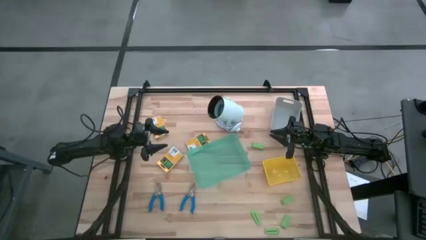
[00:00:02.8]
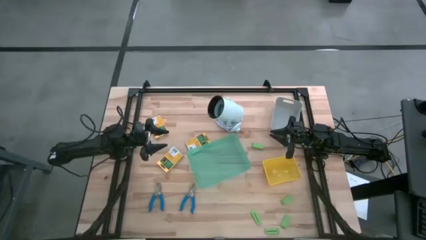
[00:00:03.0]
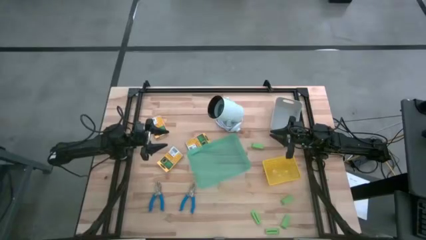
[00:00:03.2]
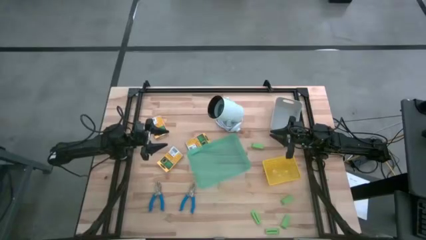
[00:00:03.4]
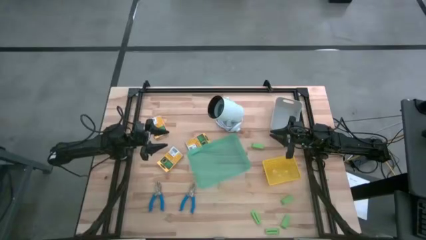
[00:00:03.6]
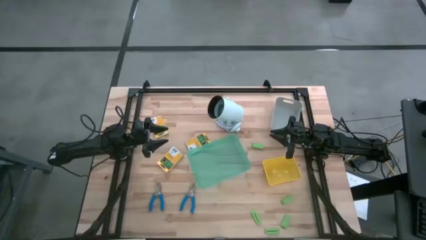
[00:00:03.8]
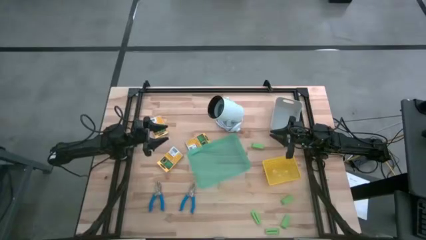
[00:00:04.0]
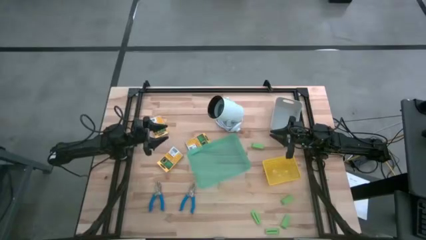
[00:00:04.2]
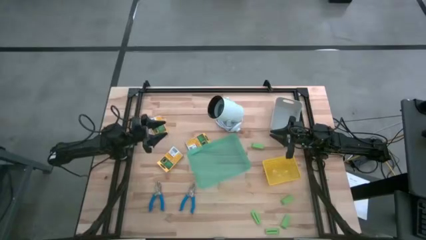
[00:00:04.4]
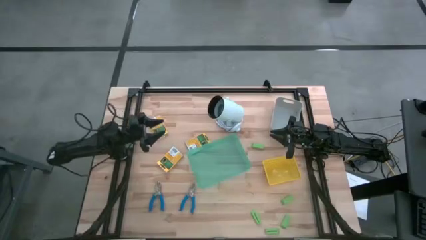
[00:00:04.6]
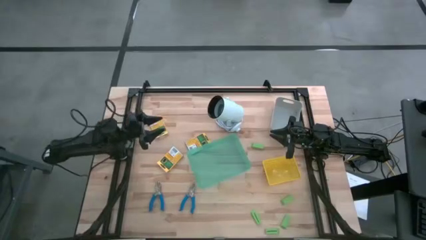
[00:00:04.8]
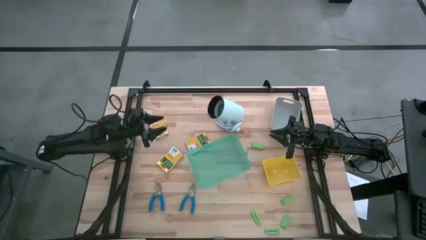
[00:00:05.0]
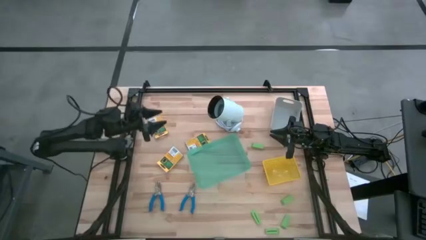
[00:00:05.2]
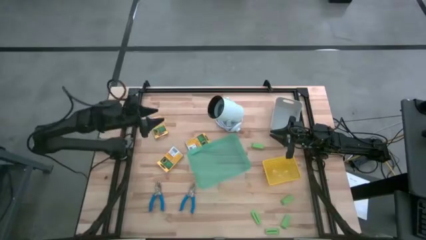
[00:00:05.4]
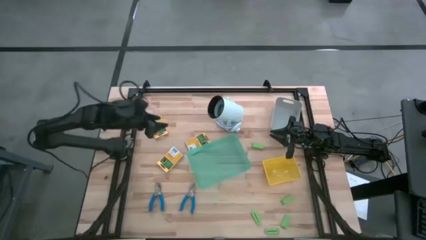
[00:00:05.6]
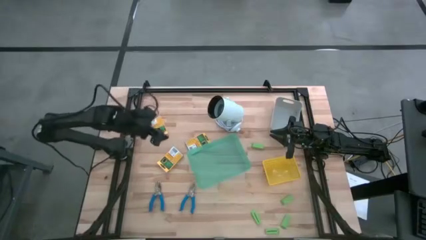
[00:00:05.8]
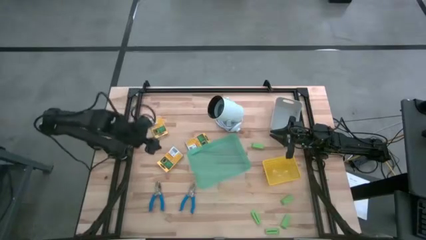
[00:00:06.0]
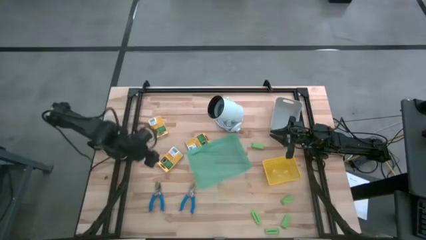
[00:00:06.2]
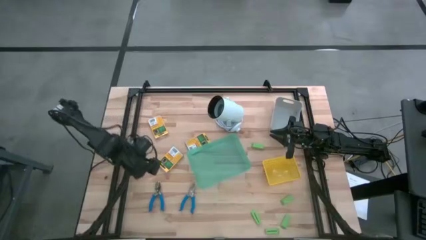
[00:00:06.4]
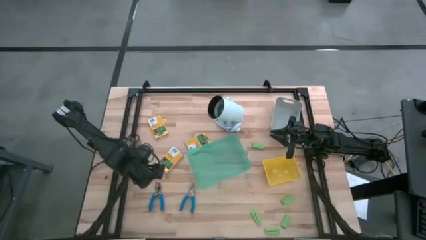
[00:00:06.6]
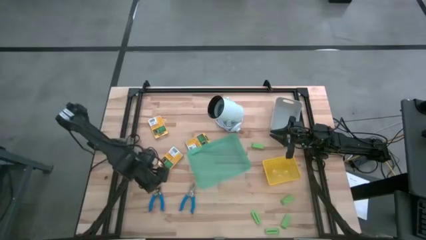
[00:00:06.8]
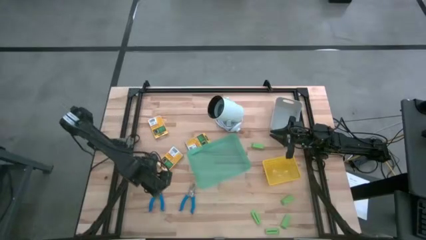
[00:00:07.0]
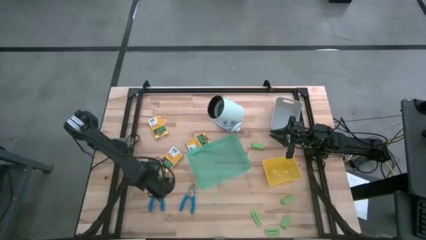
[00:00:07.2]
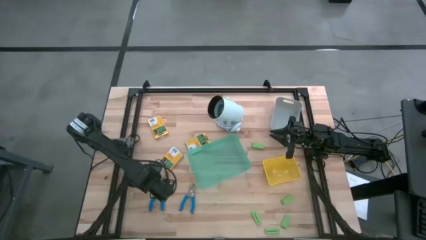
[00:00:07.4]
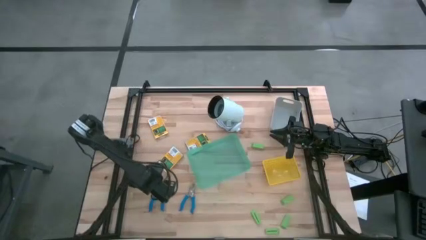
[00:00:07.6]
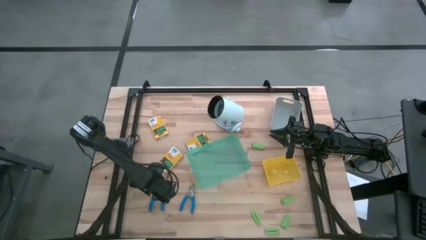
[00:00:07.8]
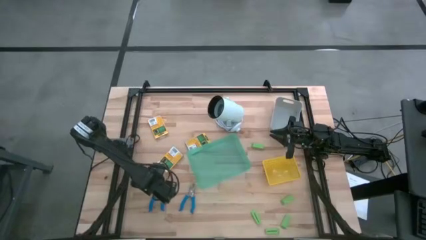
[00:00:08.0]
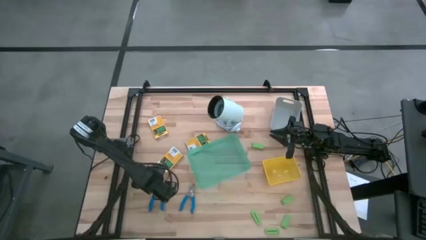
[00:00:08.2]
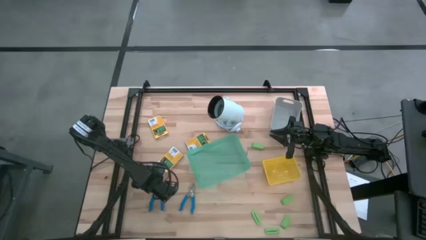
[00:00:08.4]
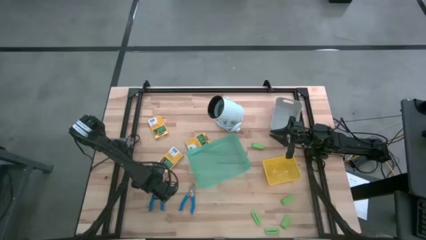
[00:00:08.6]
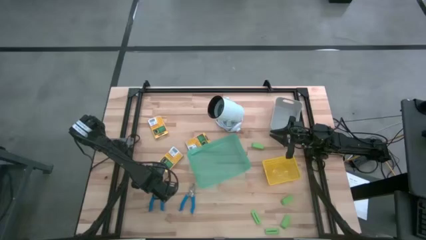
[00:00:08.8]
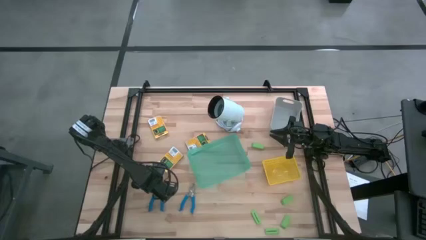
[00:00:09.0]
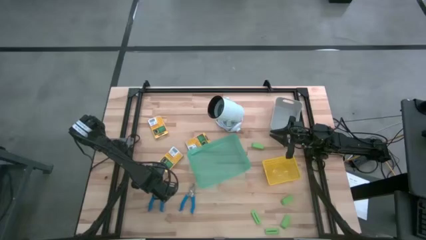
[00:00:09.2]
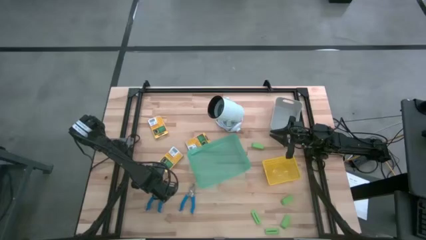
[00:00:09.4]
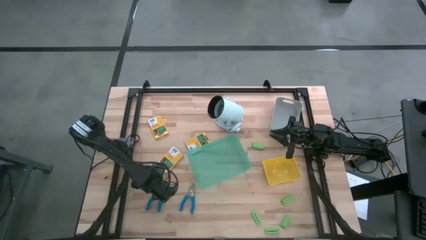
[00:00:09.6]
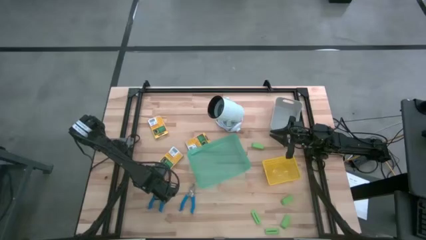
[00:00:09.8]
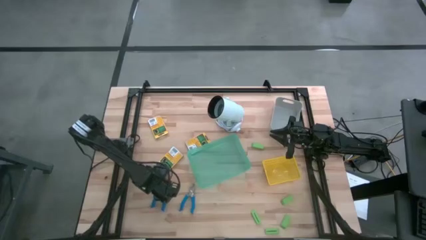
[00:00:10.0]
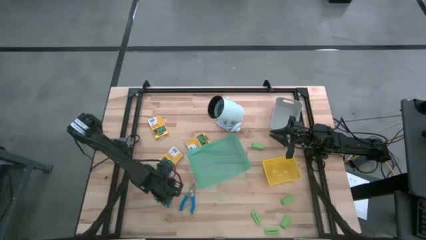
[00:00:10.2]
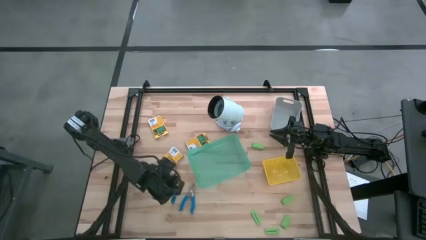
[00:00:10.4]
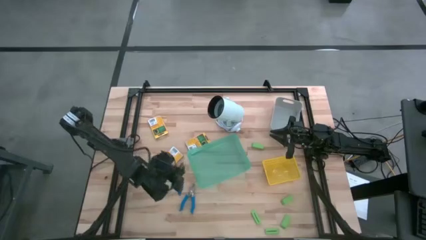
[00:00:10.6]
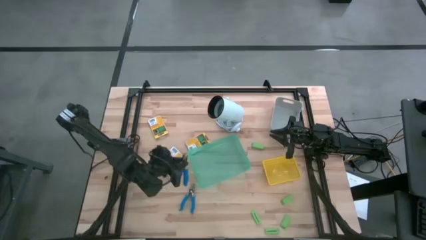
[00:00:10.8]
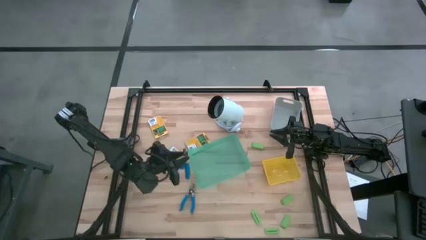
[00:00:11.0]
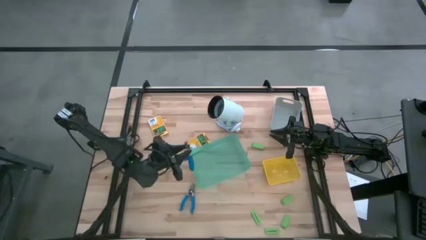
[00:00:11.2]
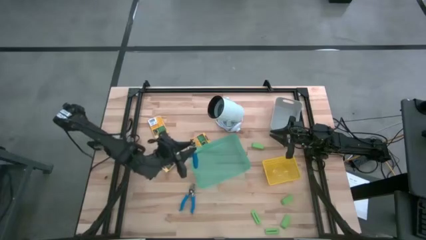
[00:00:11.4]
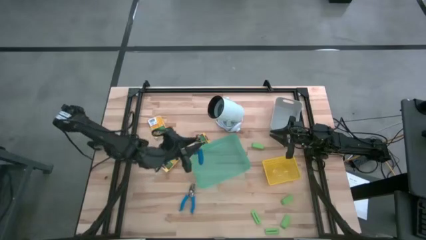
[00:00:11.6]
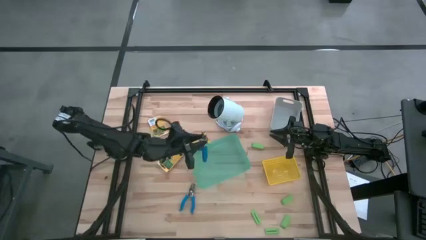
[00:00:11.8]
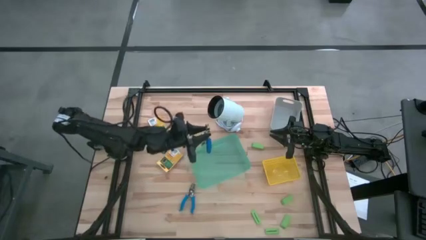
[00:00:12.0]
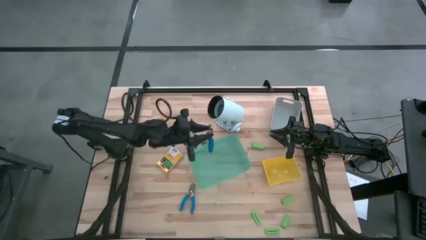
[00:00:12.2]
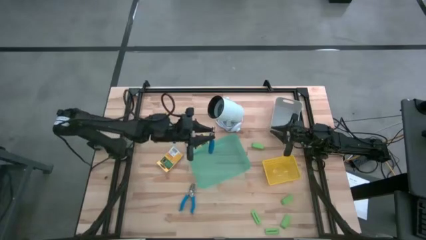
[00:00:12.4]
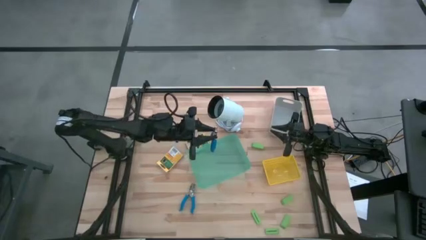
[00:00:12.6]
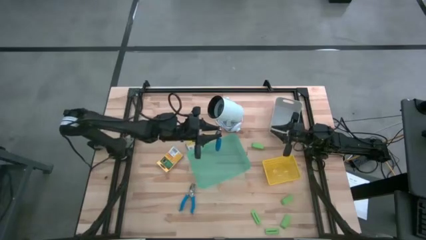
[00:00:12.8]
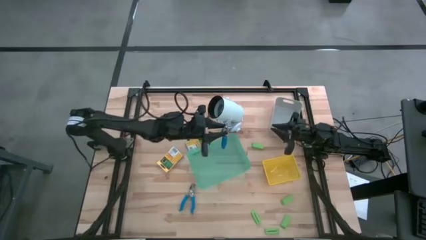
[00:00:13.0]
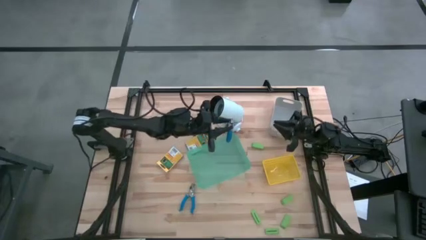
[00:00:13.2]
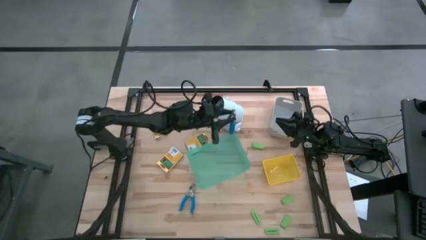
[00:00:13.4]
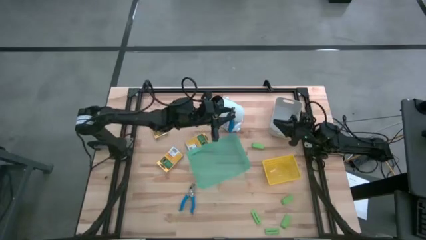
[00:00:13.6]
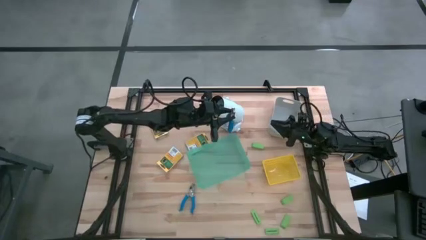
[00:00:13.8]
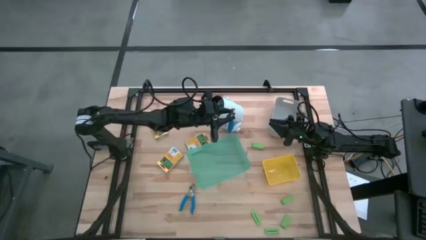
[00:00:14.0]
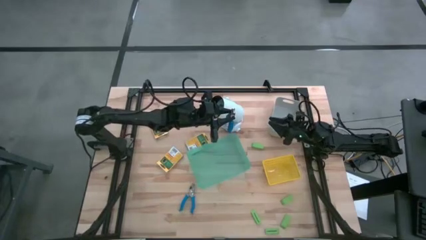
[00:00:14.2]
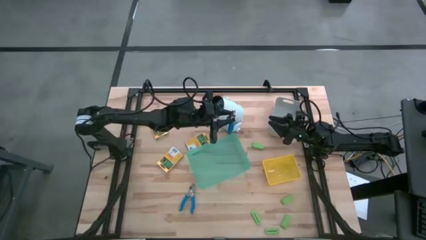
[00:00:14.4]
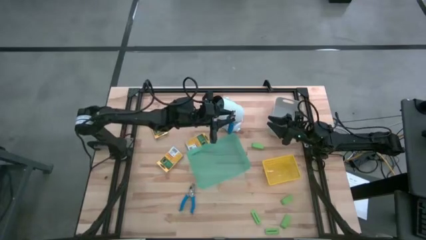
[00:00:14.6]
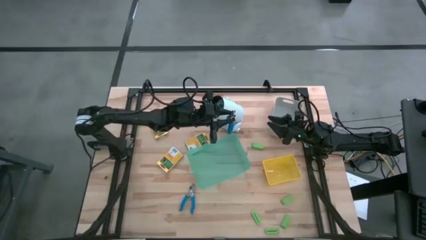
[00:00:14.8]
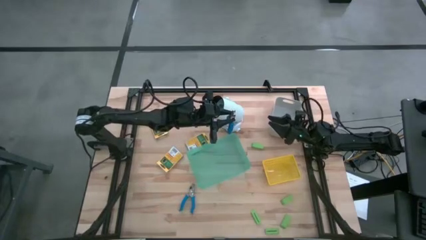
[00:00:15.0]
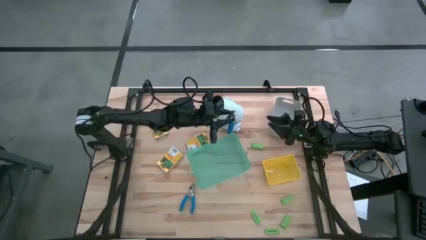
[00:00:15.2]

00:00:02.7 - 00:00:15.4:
Task: Pick & Place School Supplies
Put the blue plier into the gray bin
